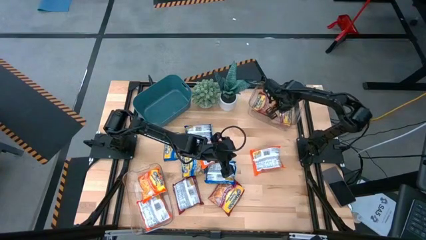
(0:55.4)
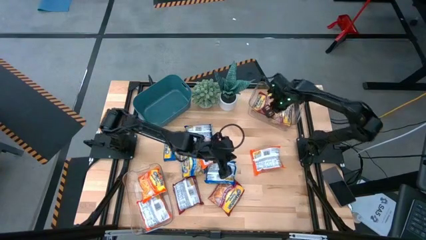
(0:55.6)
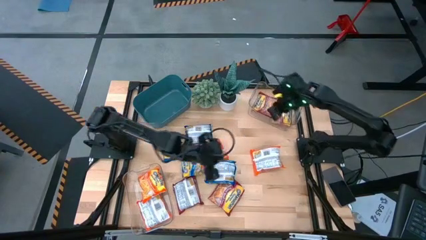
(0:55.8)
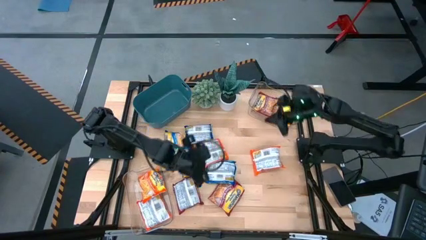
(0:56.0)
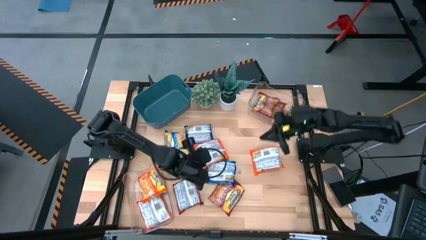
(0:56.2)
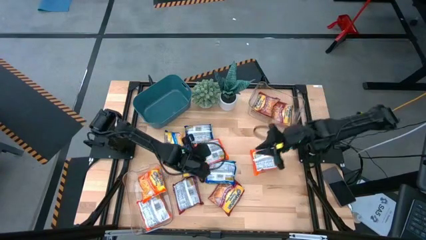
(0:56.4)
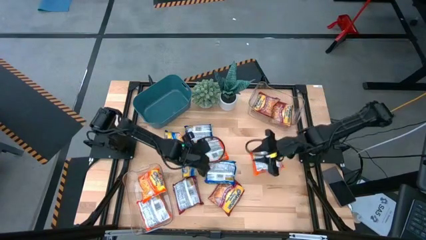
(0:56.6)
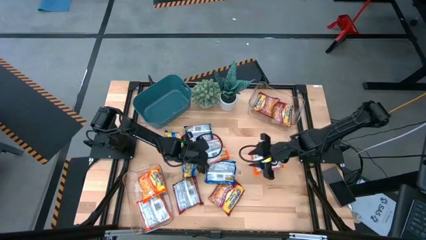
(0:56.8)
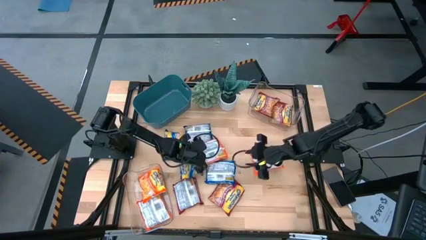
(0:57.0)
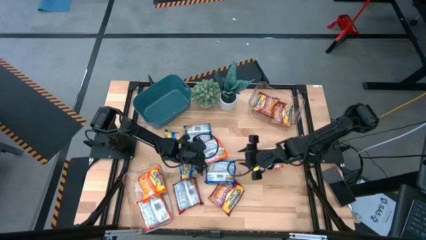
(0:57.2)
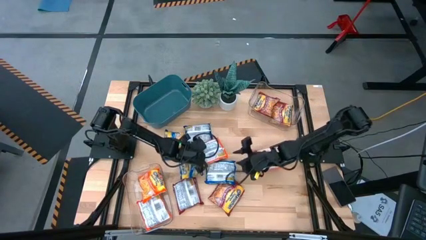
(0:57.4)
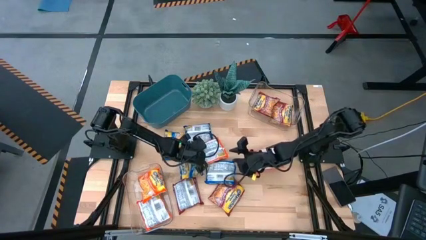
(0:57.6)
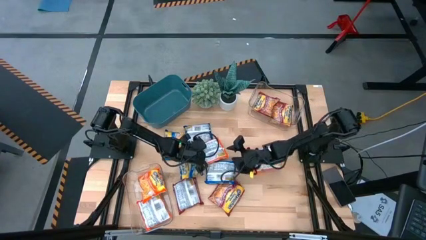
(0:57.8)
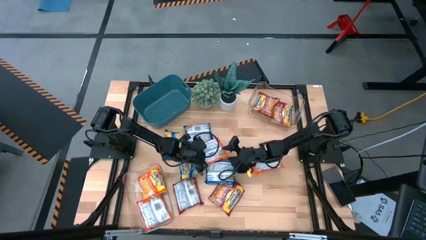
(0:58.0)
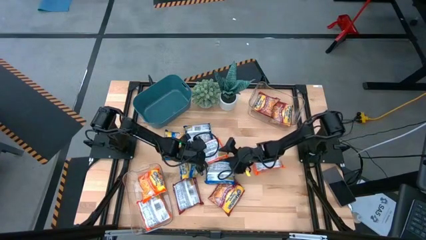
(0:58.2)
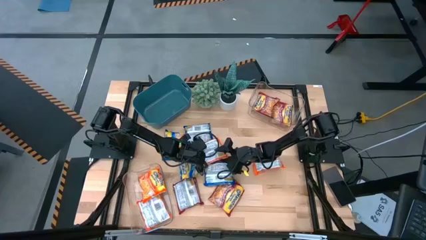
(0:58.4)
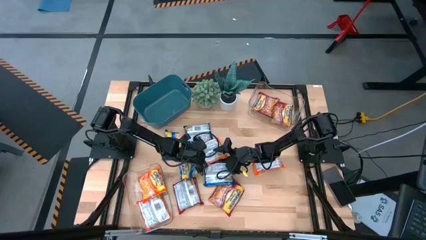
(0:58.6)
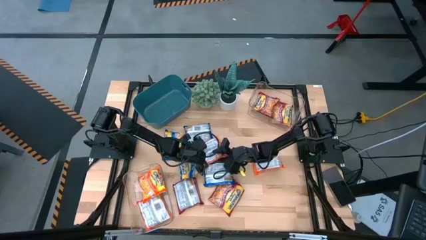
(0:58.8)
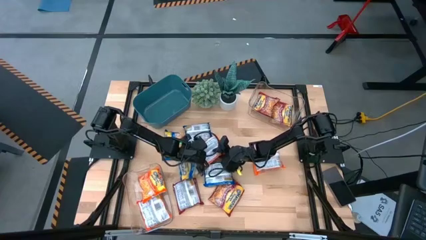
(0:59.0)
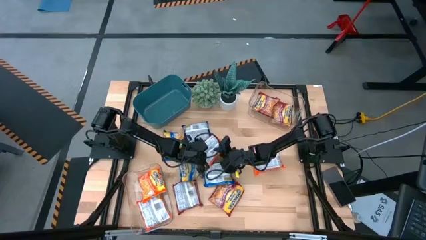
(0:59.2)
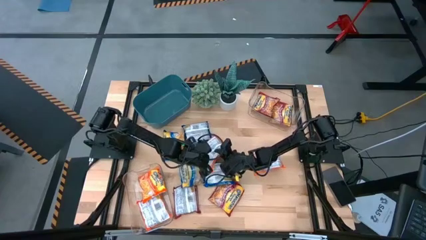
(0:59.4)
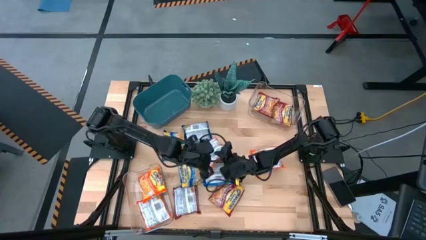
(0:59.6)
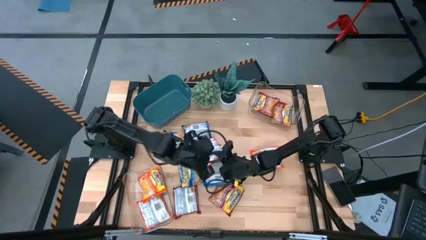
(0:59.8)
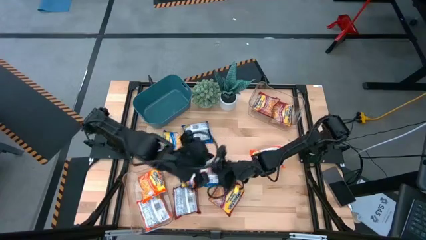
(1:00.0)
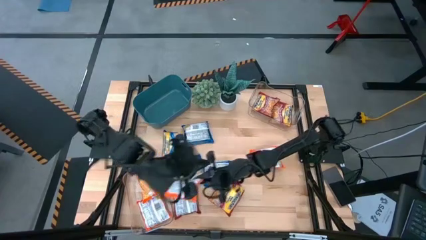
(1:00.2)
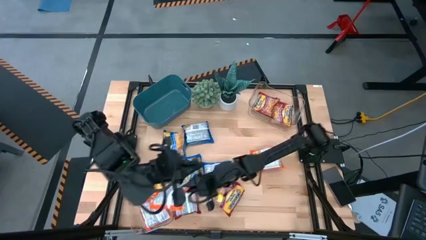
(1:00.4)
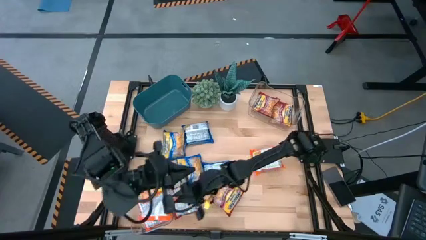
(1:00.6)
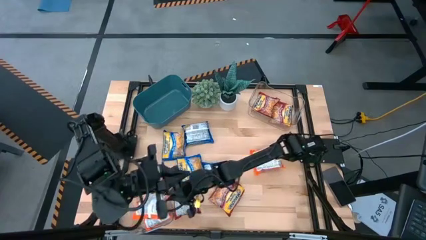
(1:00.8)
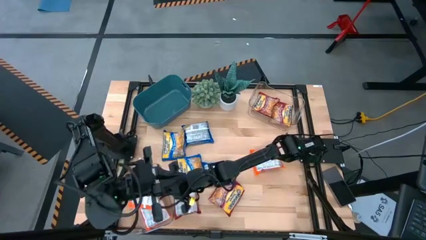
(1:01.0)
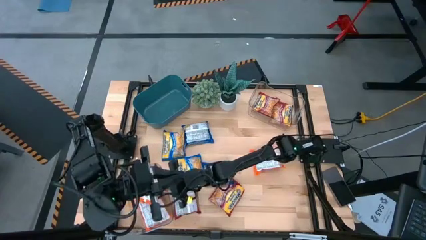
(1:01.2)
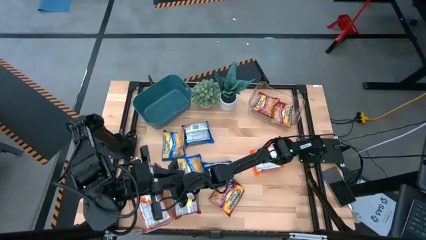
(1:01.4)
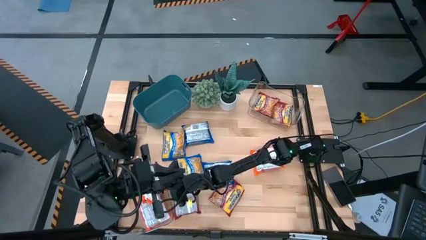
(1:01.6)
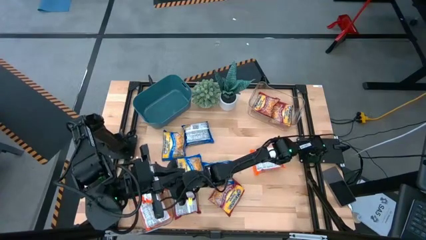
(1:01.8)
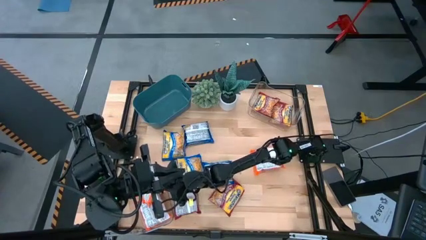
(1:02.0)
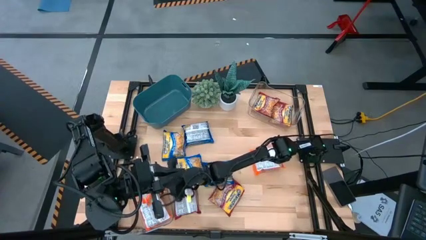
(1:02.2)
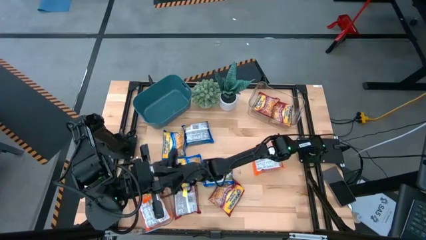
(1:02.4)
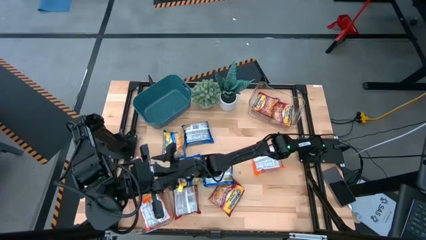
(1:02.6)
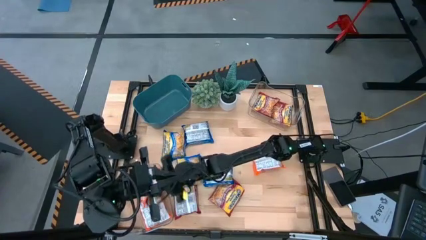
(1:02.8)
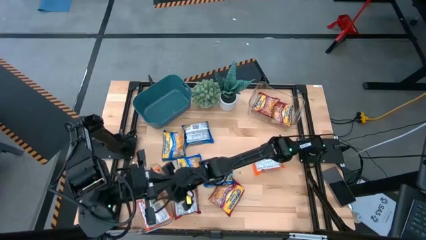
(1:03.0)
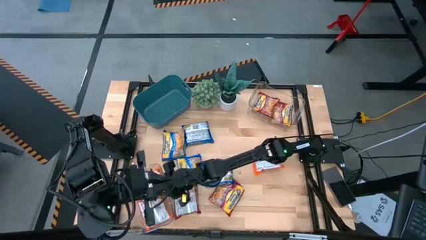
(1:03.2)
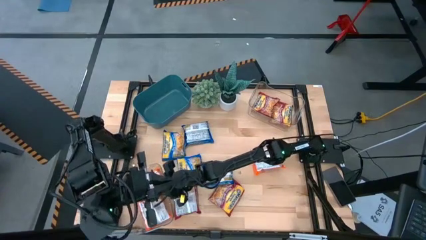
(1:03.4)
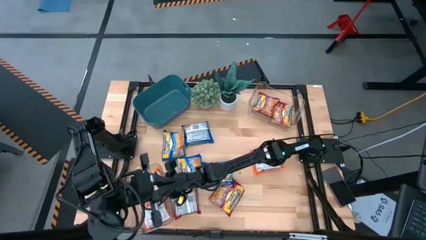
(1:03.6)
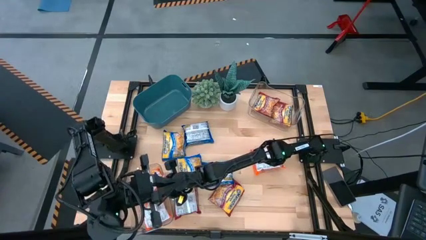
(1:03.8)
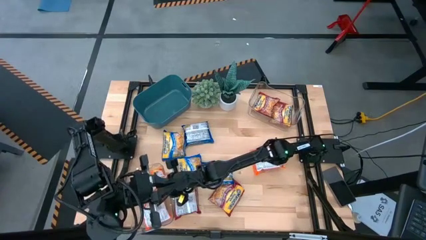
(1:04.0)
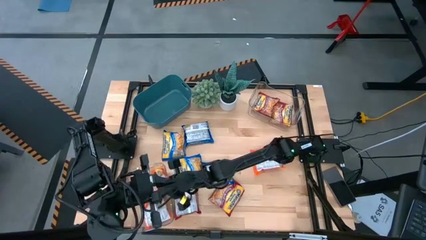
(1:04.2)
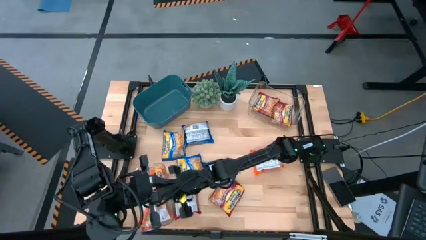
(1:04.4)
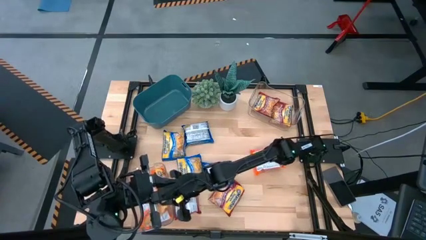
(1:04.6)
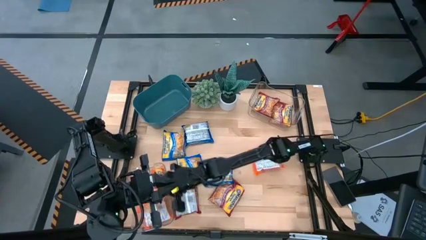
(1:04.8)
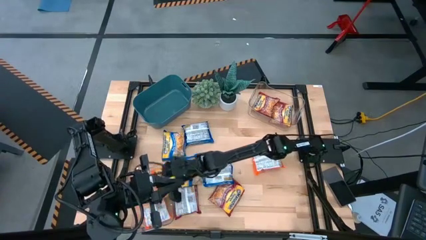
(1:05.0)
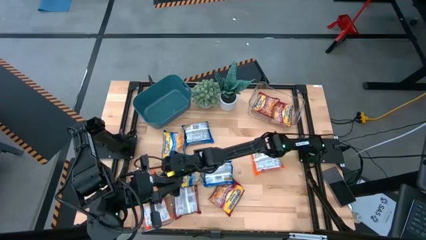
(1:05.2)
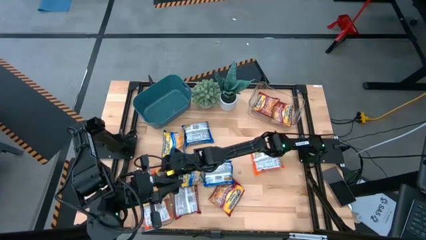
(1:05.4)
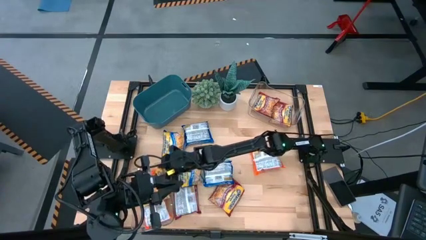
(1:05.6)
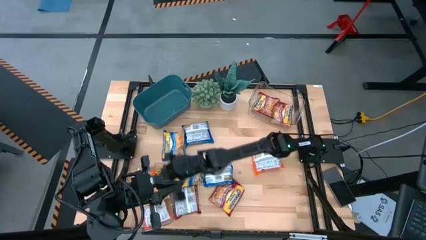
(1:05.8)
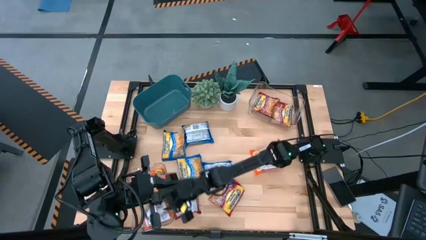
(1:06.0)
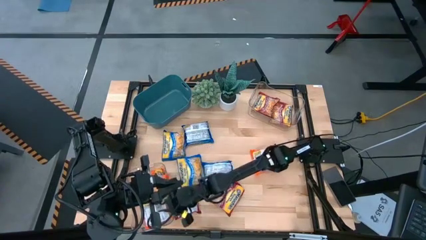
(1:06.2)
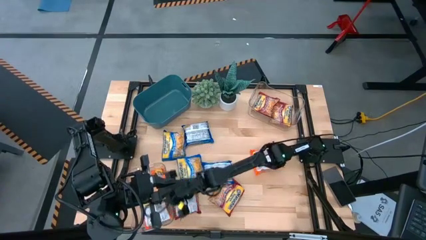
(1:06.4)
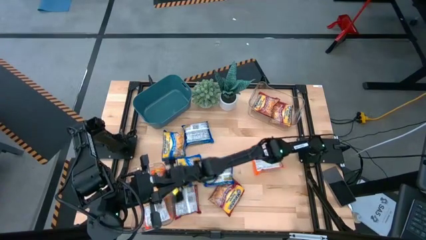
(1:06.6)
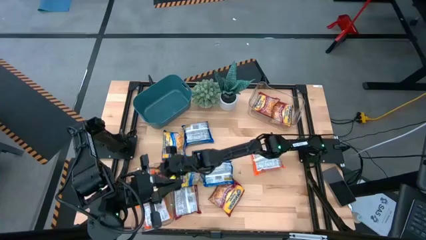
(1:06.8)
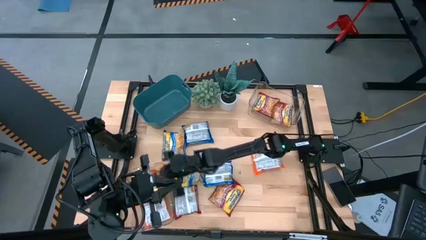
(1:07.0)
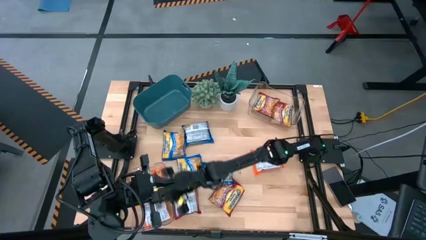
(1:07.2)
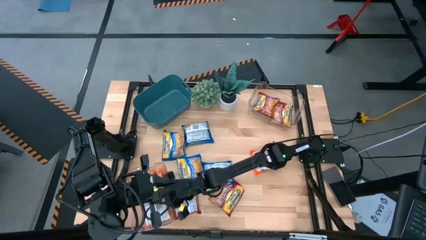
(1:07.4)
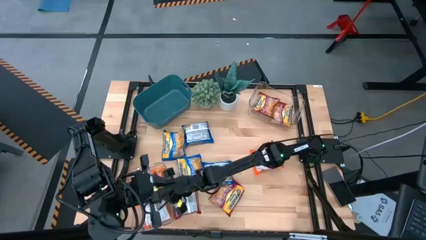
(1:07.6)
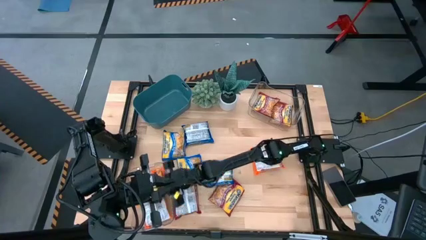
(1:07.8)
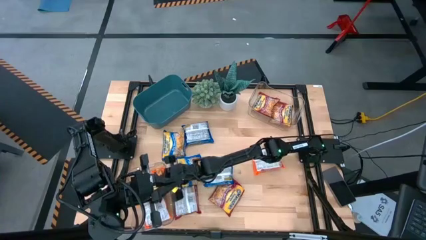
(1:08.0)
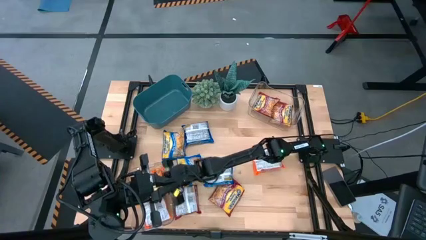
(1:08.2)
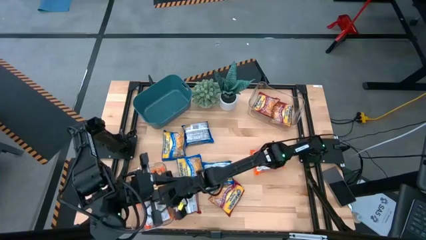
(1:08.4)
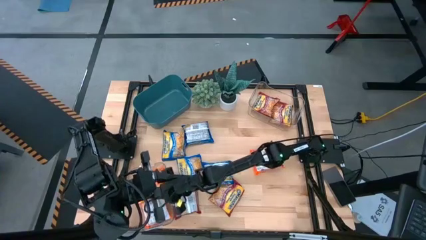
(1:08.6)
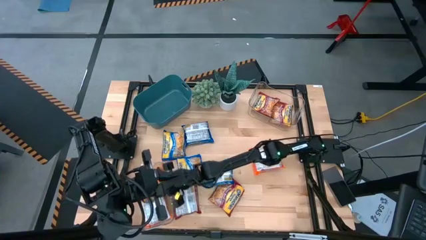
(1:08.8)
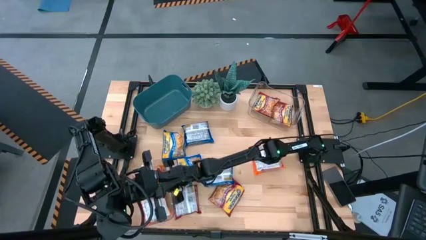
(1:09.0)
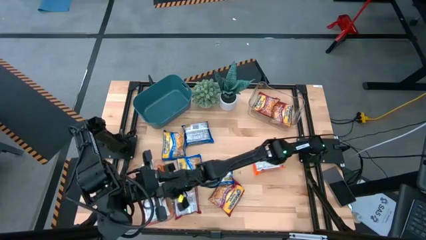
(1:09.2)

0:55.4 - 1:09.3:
Task: Sort Maruchan noodles
Put the orange noodle pack into the bottom transparent bin

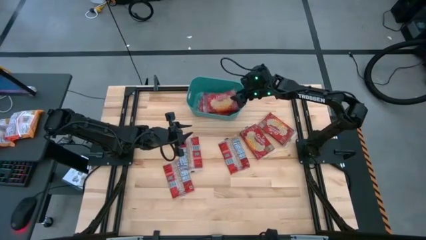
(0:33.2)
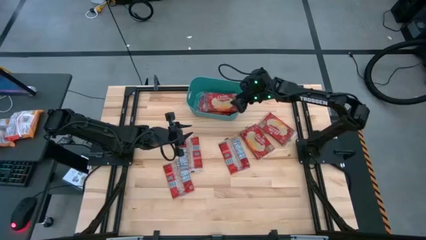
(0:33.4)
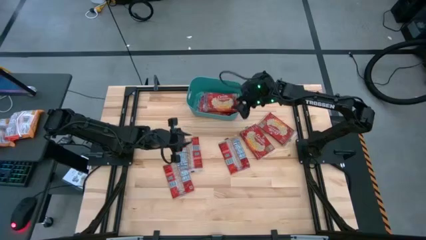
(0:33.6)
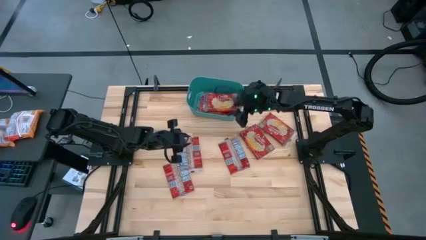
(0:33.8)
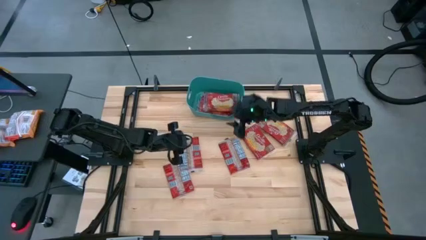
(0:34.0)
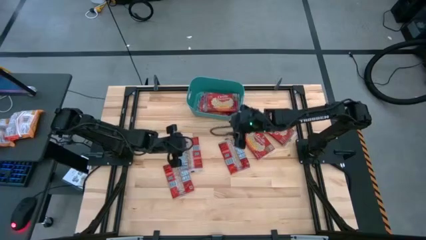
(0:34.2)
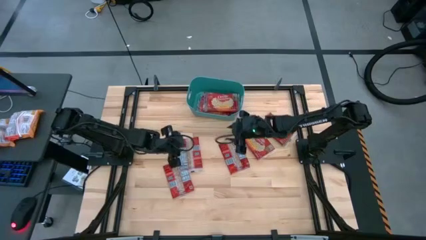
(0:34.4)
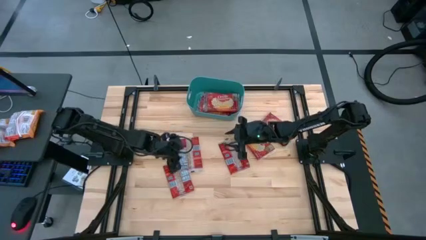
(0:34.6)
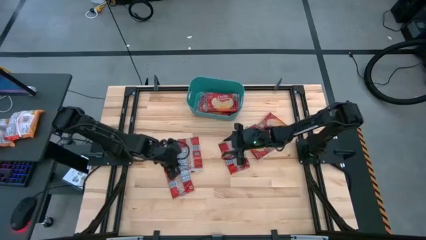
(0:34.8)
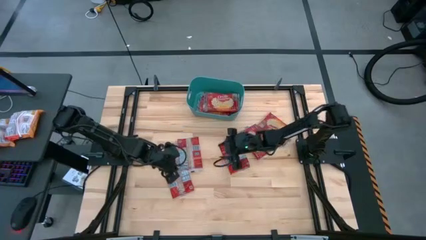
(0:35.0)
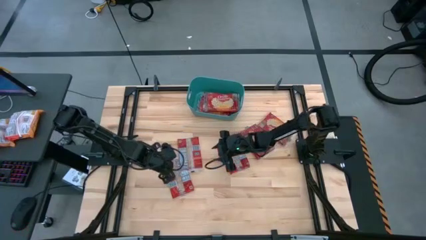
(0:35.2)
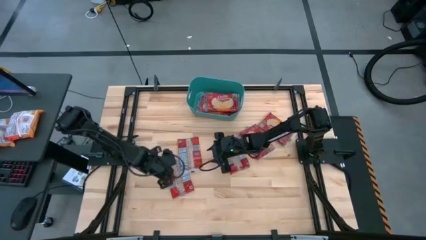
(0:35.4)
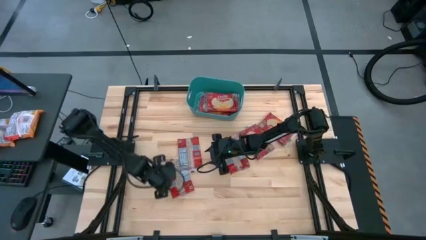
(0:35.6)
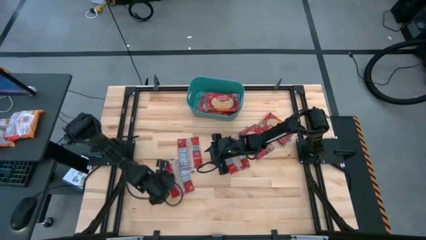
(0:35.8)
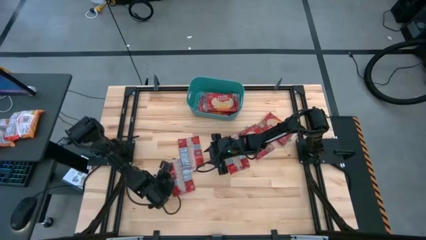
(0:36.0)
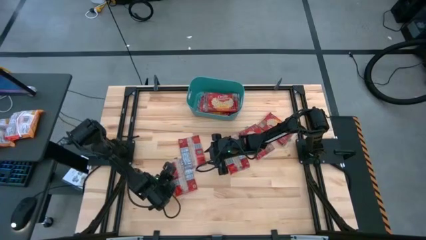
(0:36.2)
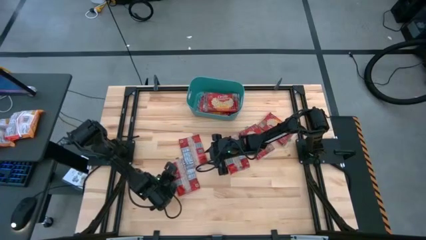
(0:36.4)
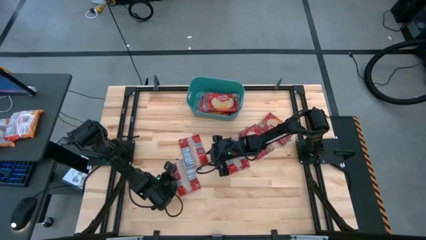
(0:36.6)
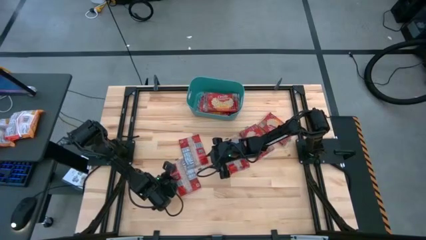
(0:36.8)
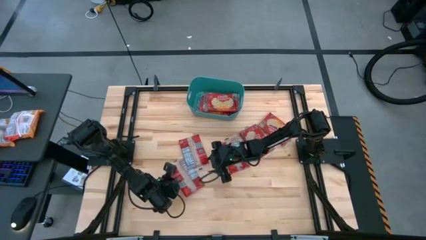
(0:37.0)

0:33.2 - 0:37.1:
Task: Sort popcorn bags into baskets
Put the red popcorn bag into the green bin
